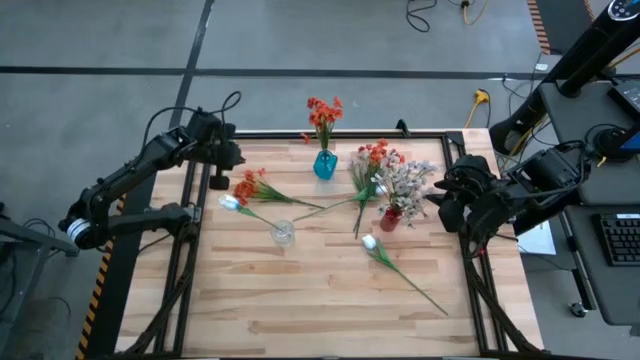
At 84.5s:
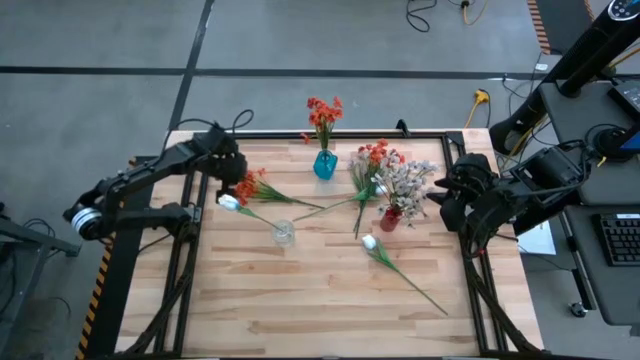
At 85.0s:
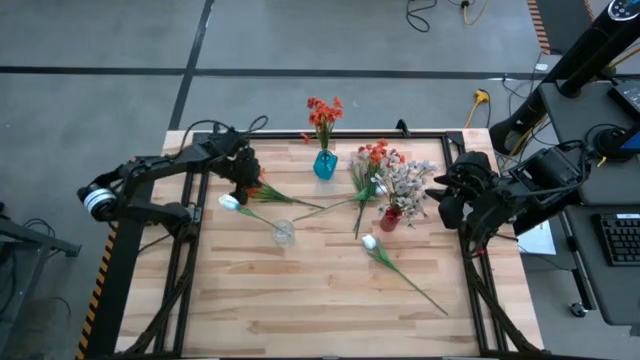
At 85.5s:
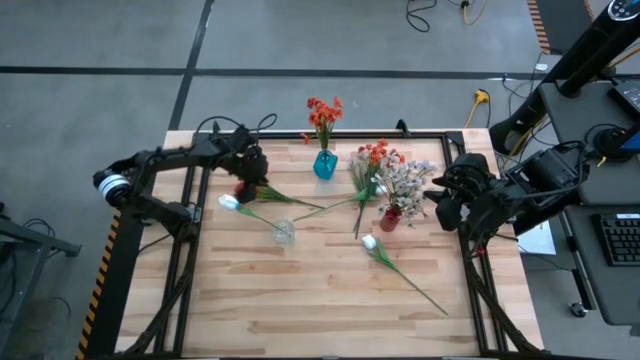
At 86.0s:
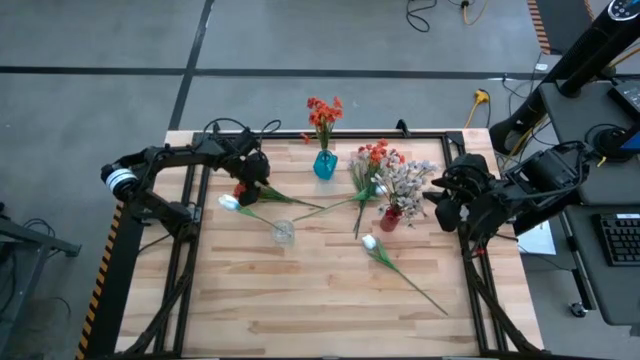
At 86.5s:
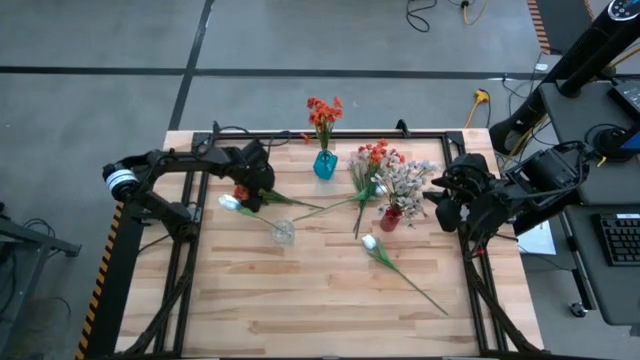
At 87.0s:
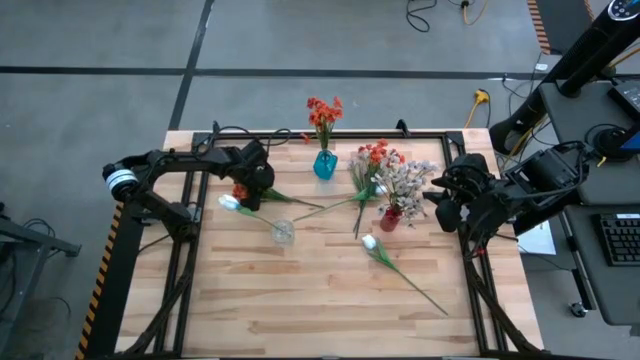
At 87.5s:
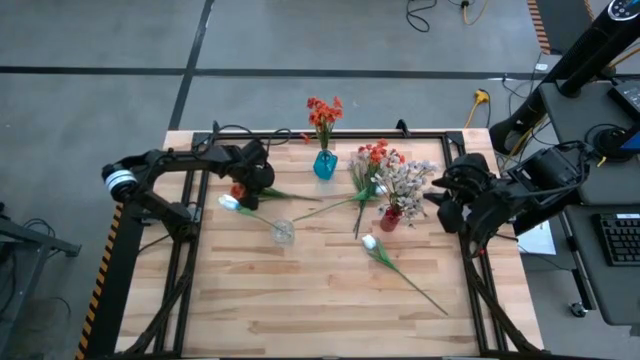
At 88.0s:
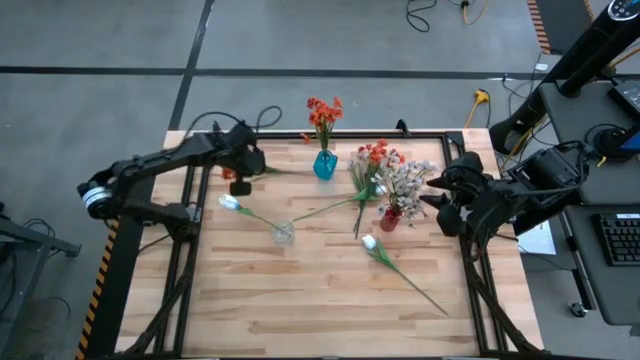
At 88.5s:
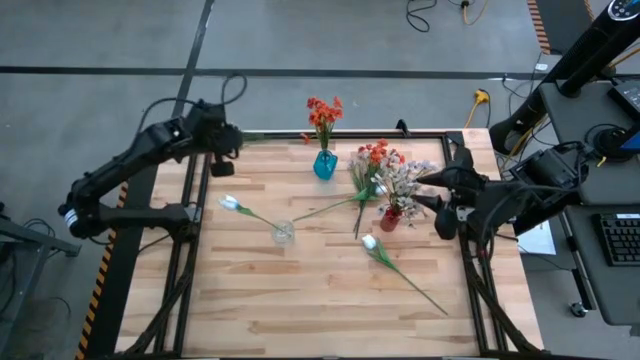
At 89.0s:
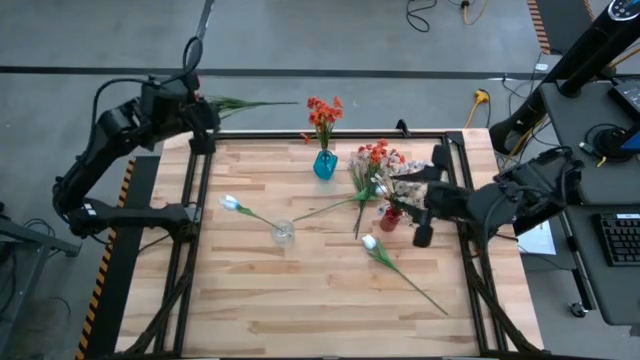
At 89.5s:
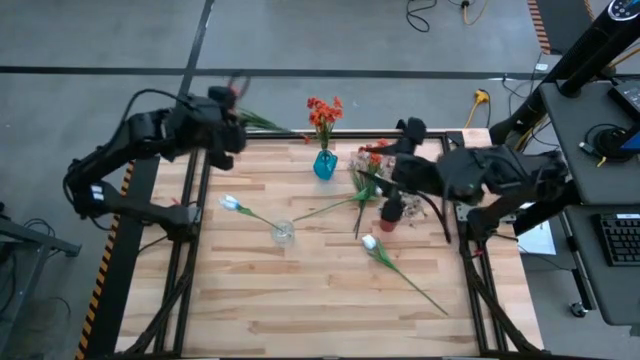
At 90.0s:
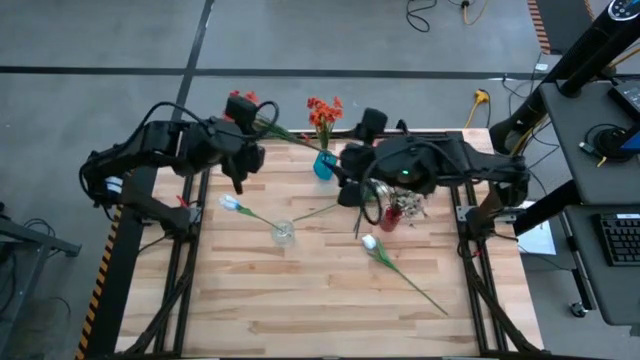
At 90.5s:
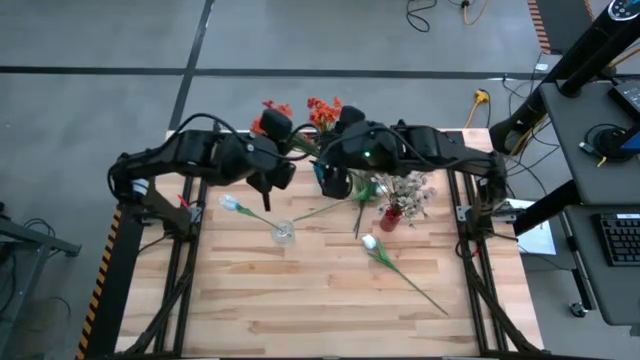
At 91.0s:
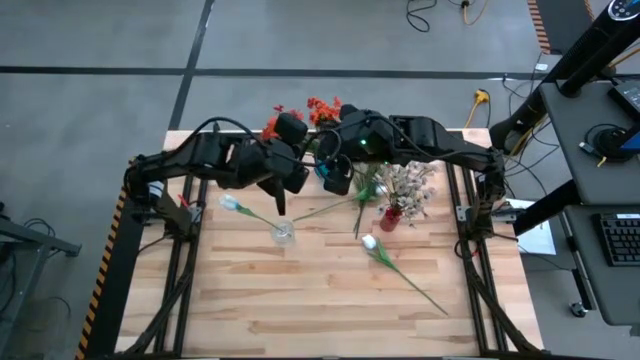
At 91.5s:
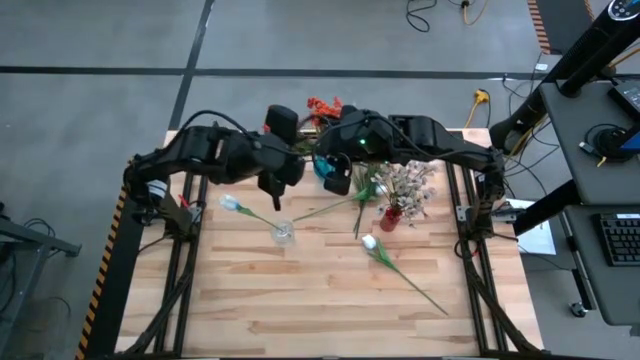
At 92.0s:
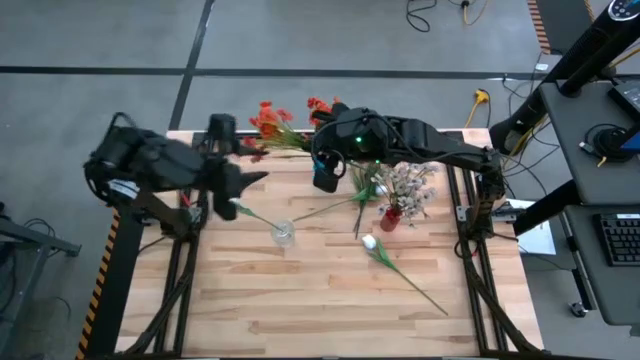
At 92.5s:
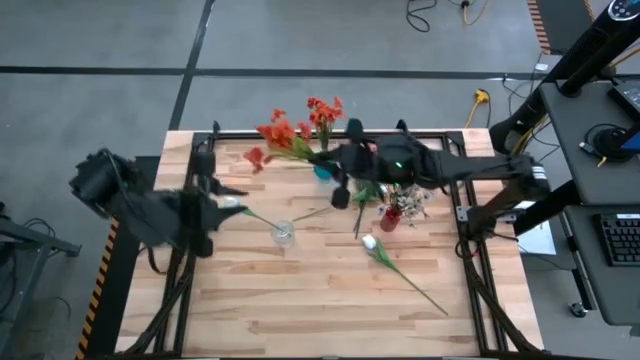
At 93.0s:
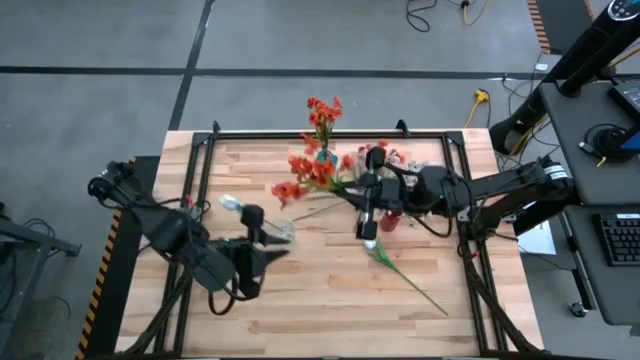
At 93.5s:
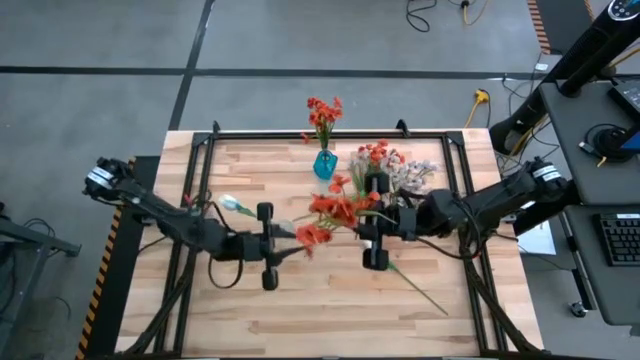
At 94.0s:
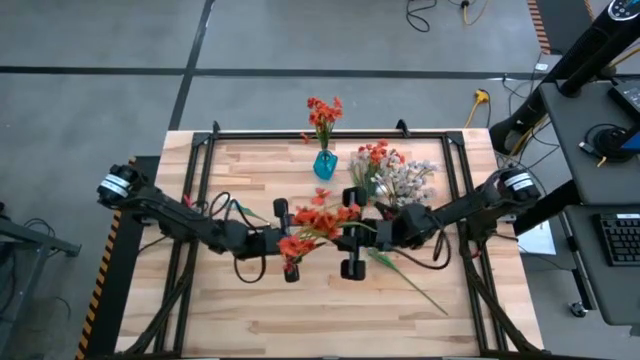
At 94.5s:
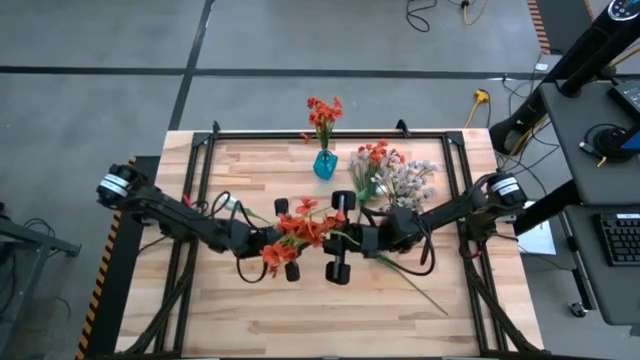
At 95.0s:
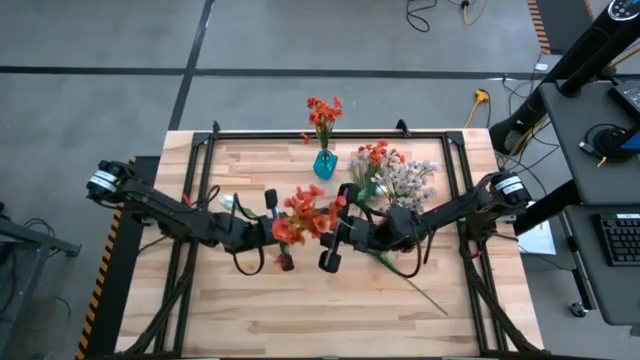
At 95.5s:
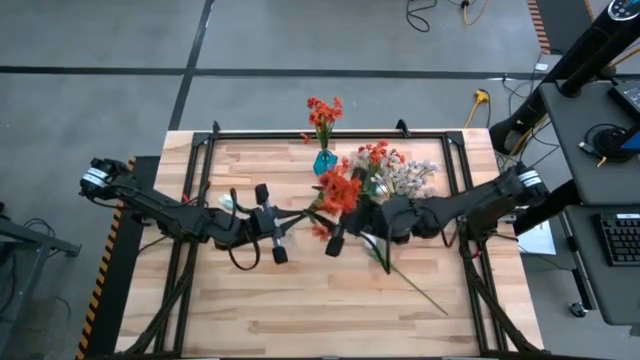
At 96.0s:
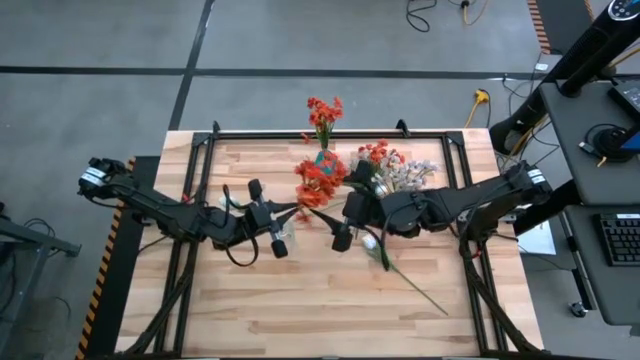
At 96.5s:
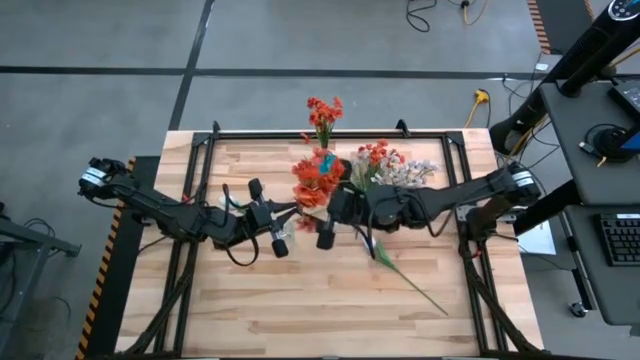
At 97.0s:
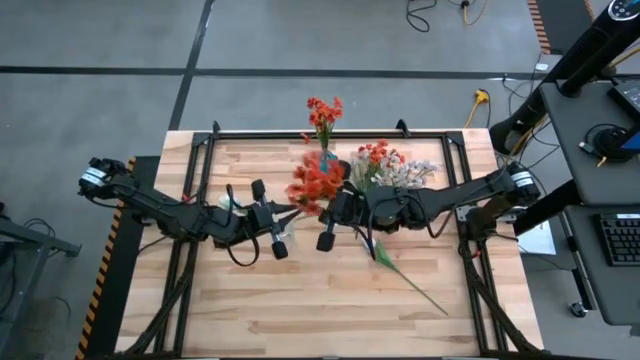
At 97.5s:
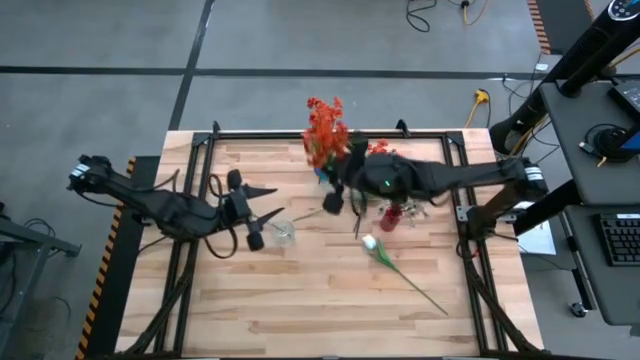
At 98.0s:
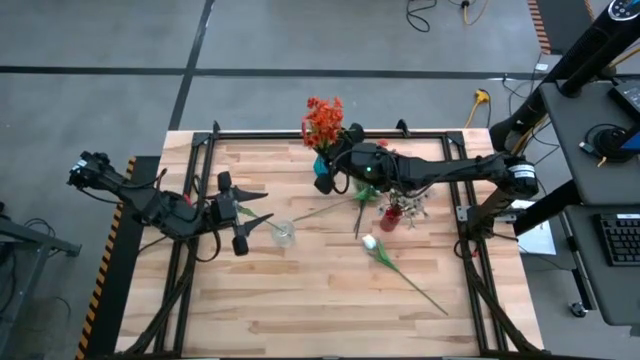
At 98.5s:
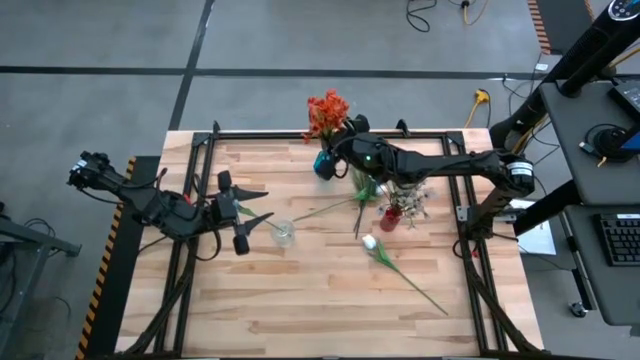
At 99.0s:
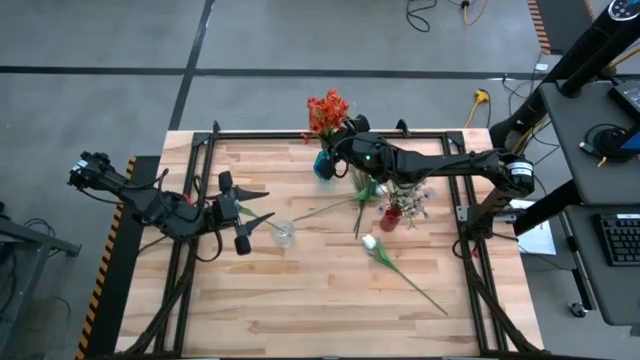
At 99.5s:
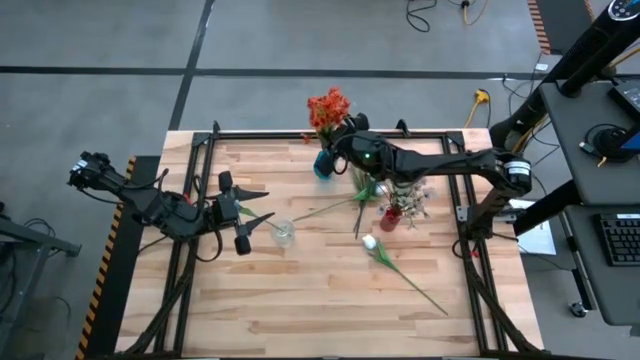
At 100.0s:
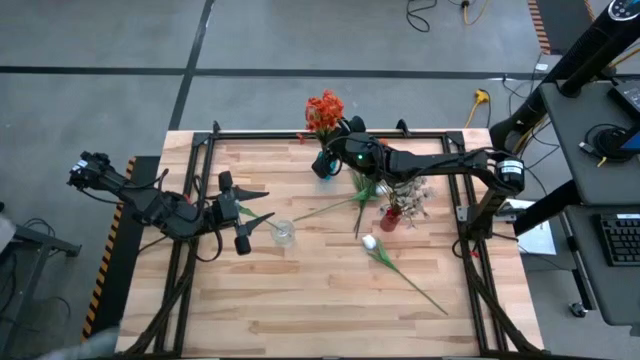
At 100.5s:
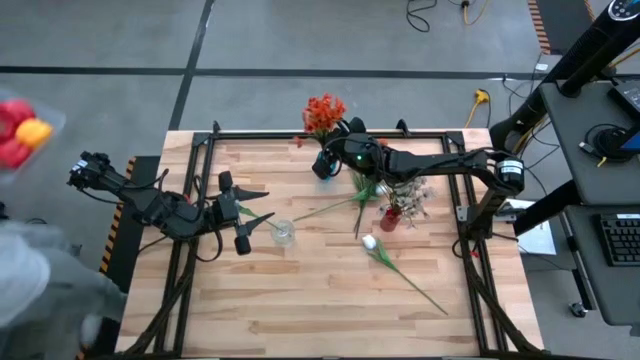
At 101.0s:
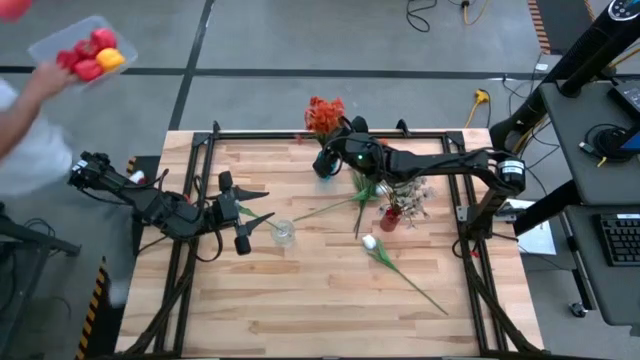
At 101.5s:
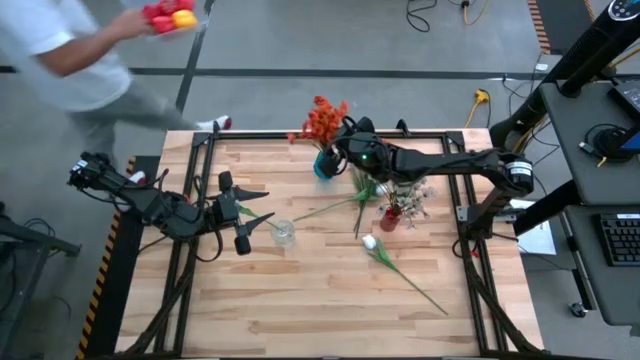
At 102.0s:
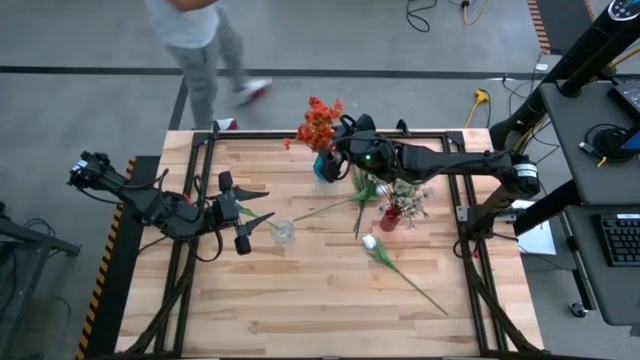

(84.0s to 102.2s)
Task: Sort flowers into vase by color
Put the left orange flowers into the blue vase

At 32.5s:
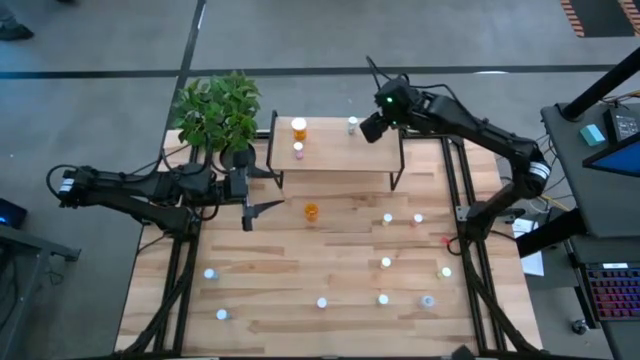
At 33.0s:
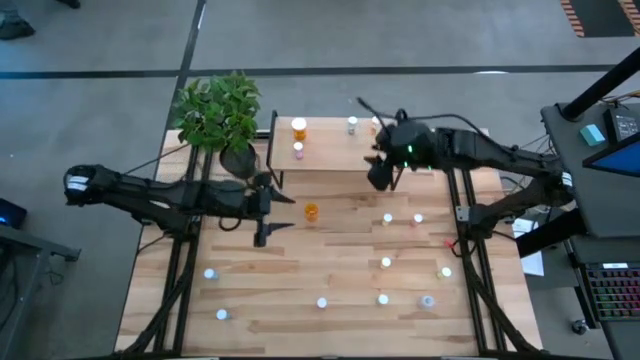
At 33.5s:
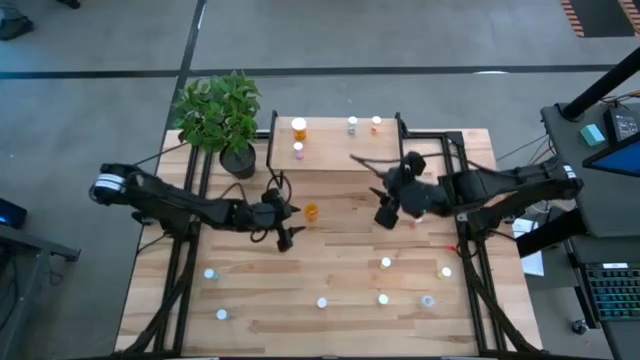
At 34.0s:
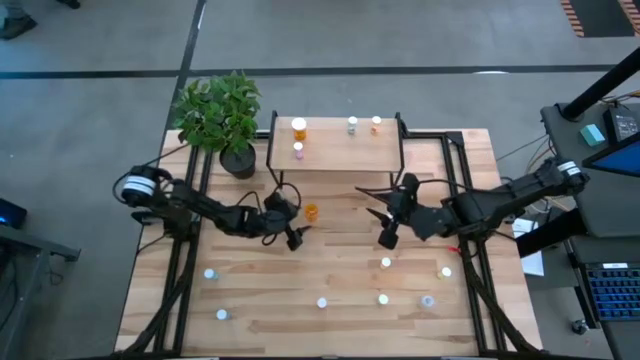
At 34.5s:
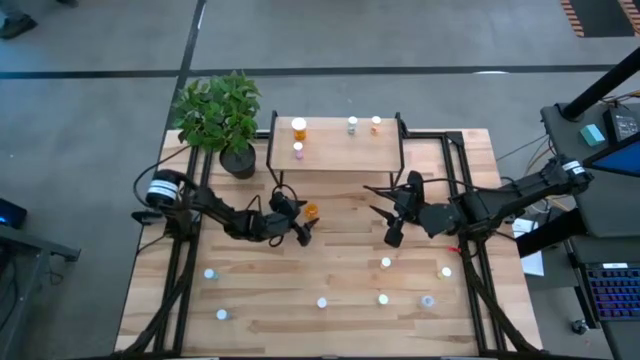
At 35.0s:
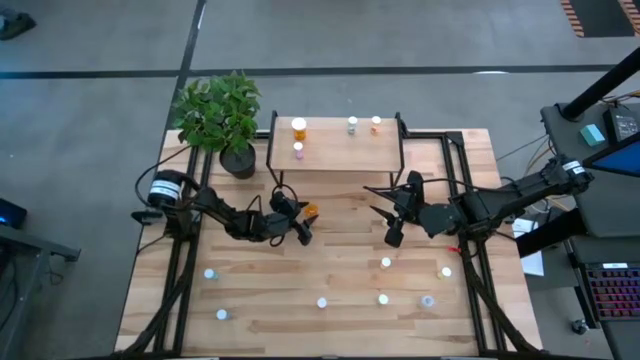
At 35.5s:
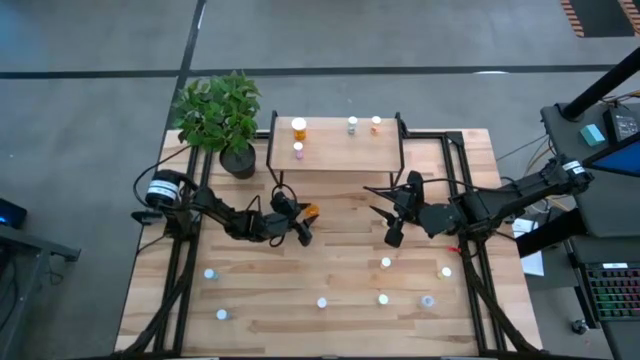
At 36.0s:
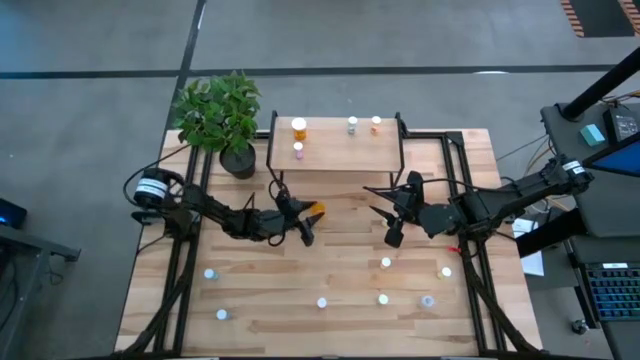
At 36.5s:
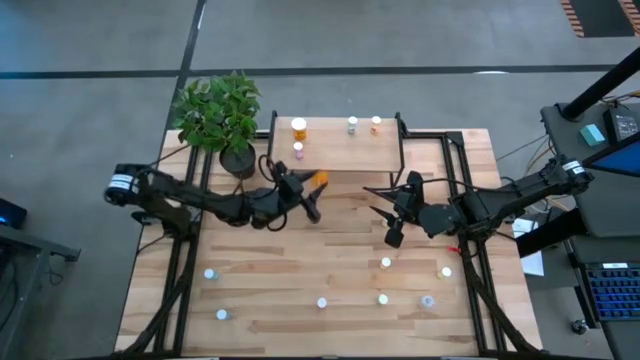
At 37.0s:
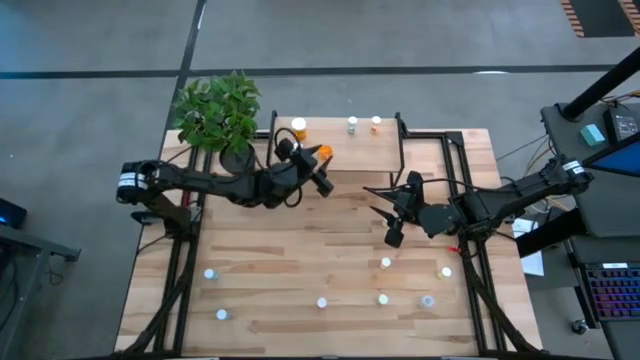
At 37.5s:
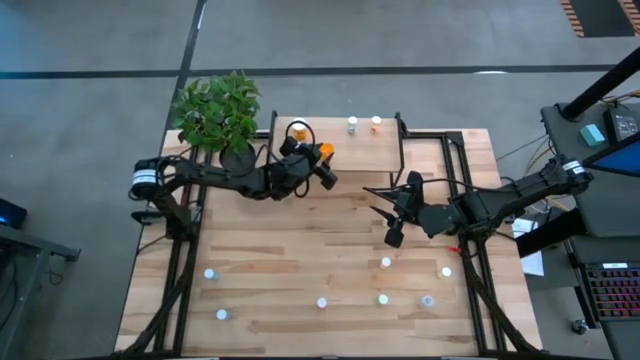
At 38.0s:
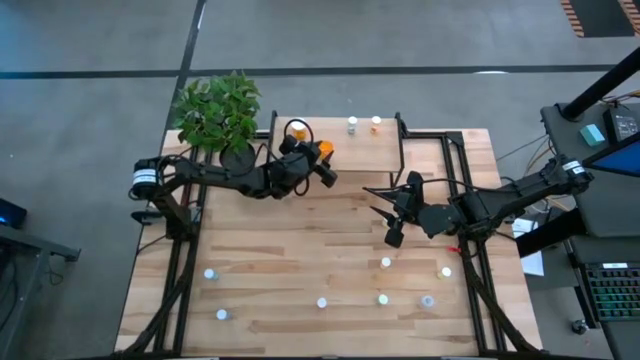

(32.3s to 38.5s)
Task: Pick and place medicine bottles onto shelf by color
Put the orange pill bottle on the shelf
